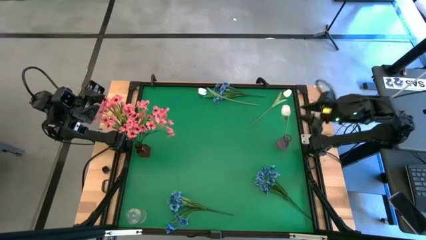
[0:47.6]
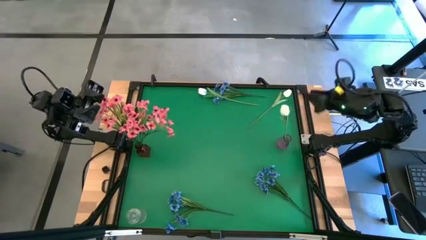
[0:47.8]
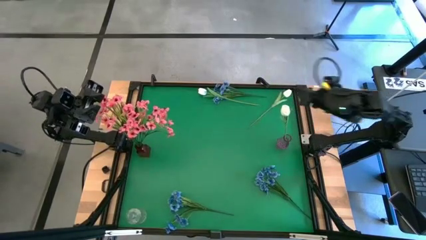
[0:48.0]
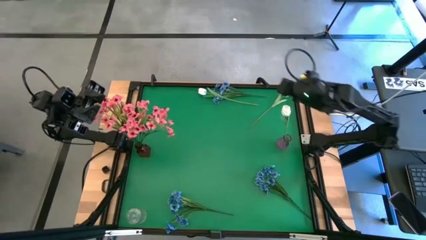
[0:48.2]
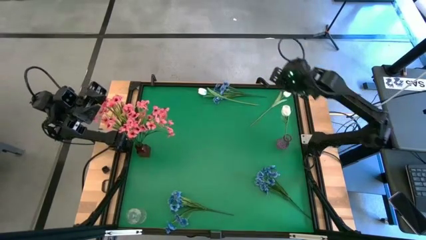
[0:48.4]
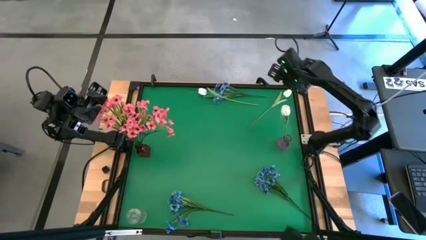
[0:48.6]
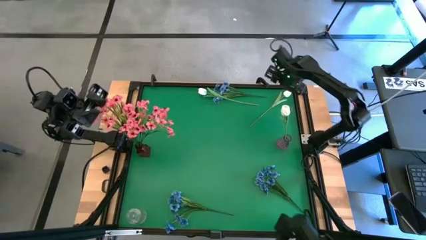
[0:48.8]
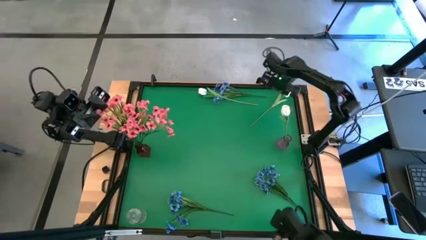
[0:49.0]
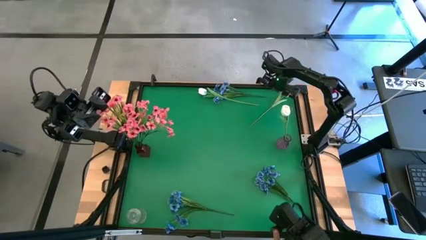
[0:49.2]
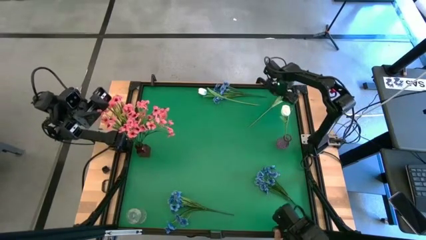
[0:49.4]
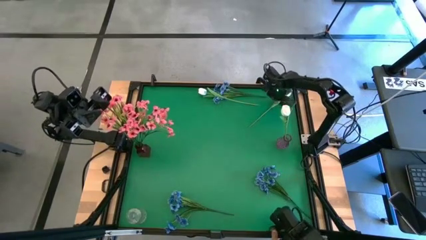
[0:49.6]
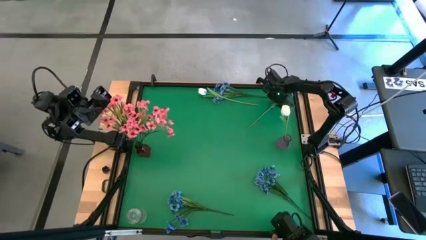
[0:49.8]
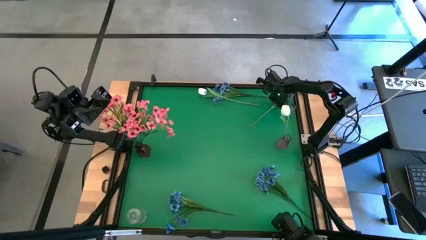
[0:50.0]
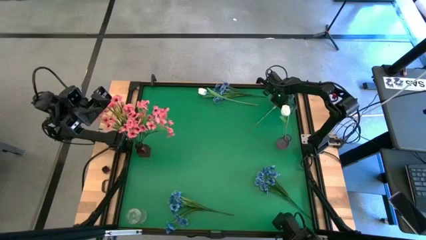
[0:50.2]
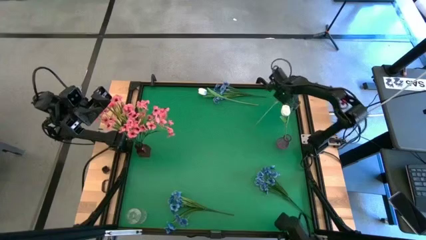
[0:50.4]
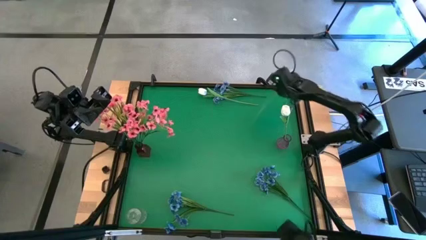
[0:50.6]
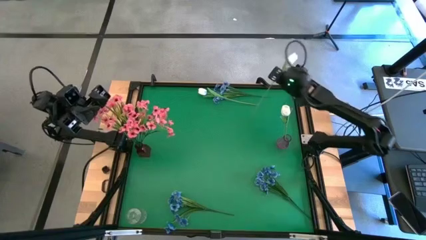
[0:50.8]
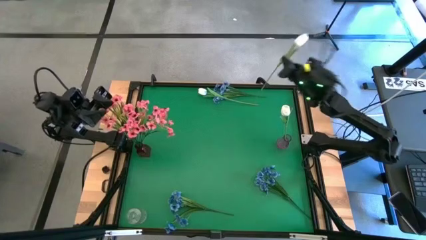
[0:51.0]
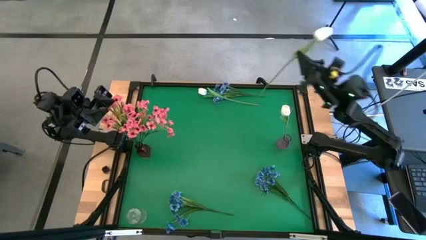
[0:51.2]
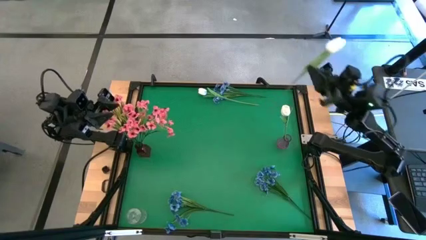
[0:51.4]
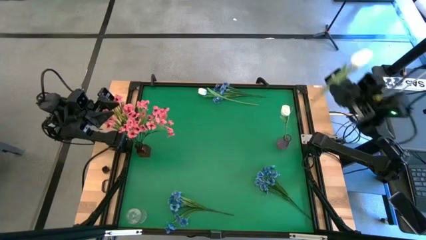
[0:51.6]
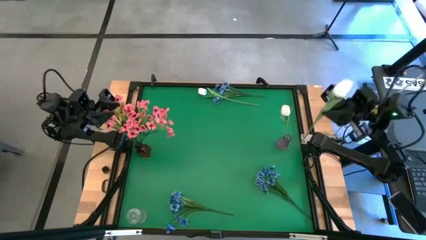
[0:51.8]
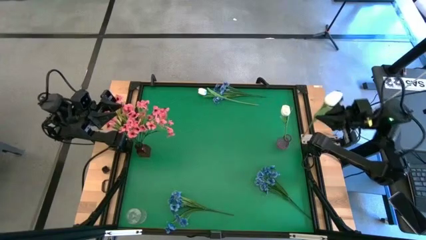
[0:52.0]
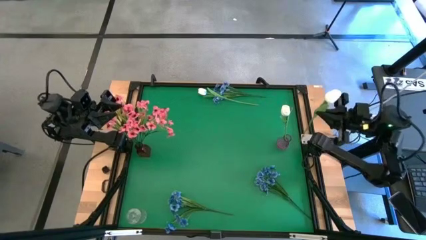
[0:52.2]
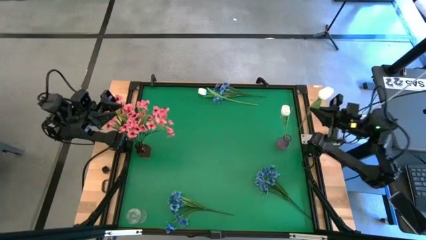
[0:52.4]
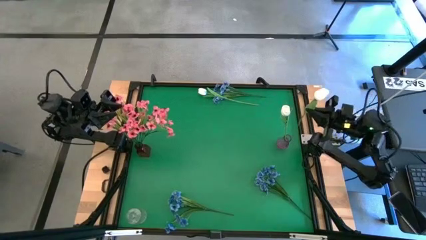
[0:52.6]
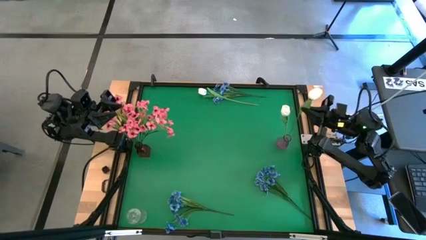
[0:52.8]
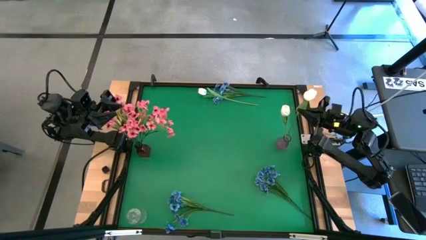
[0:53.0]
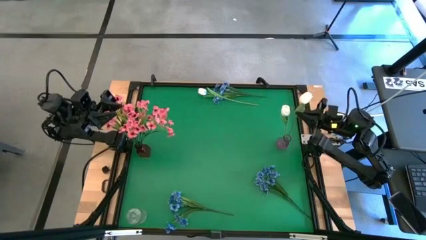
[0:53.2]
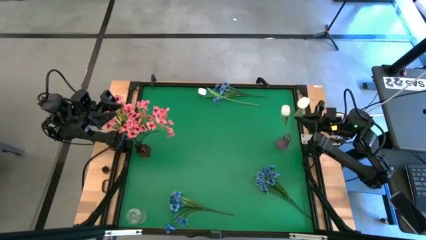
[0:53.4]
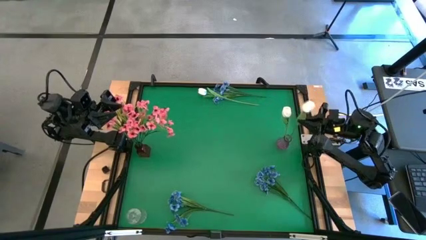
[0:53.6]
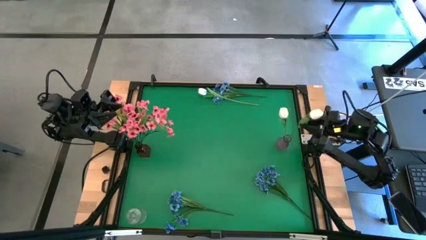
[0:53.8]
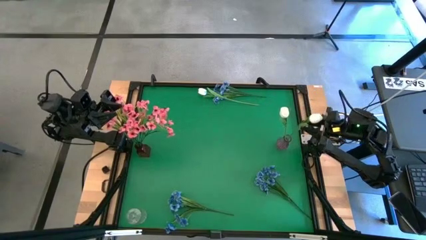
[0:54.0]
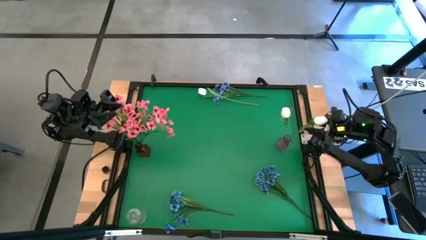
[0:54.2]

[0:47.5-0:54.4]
Task: Sort flowers into vase by color
Put the right white flower into the violet vase

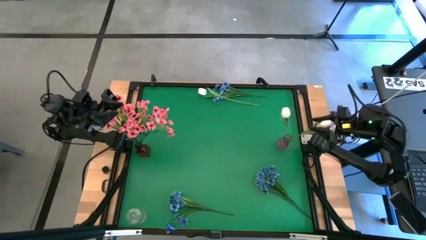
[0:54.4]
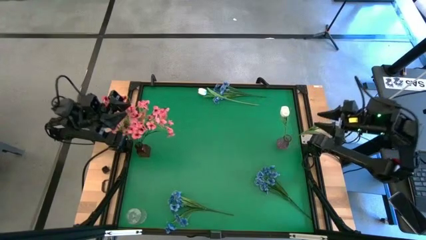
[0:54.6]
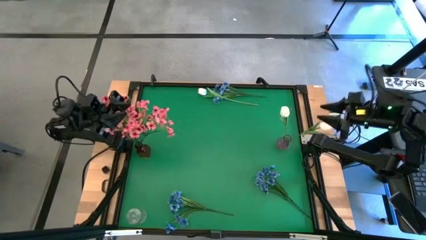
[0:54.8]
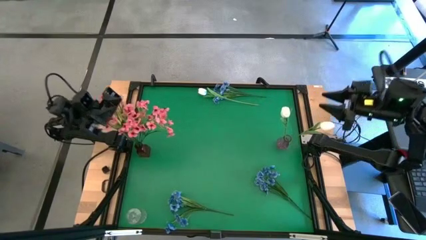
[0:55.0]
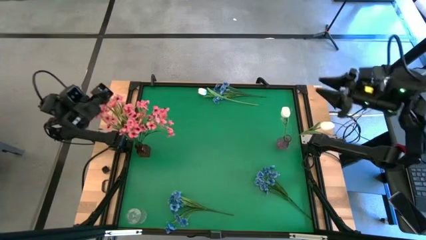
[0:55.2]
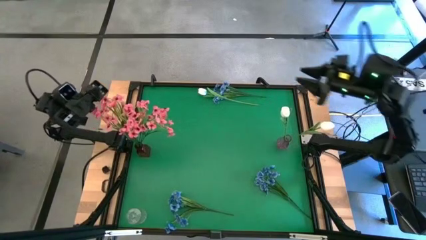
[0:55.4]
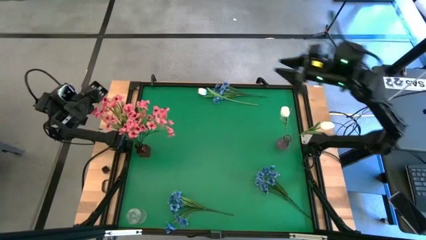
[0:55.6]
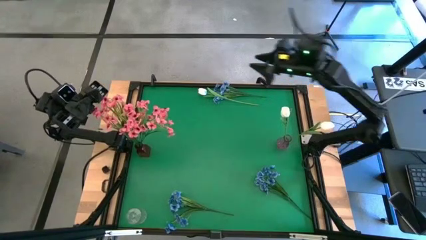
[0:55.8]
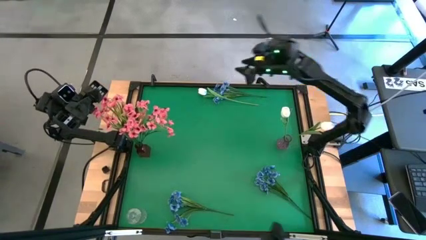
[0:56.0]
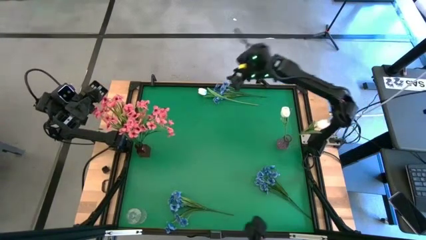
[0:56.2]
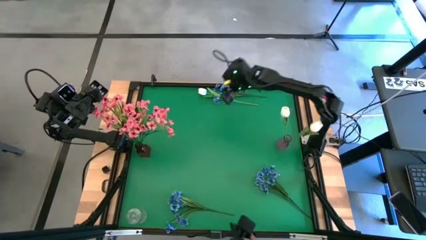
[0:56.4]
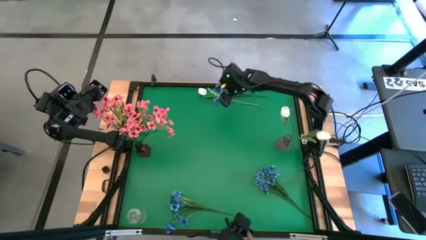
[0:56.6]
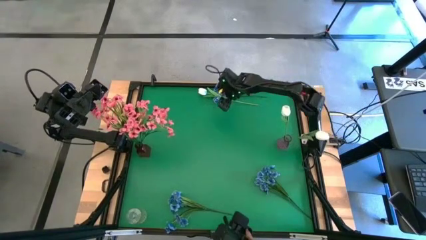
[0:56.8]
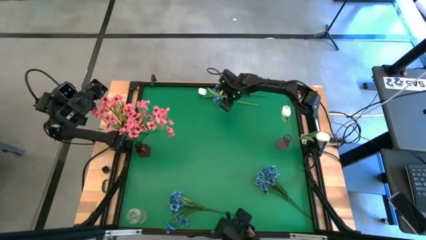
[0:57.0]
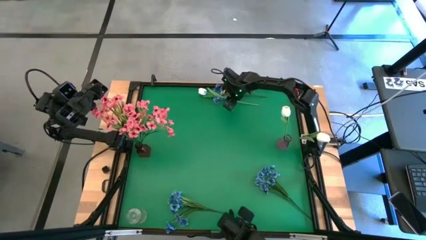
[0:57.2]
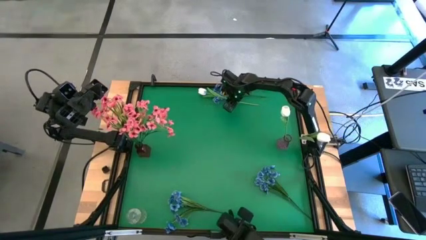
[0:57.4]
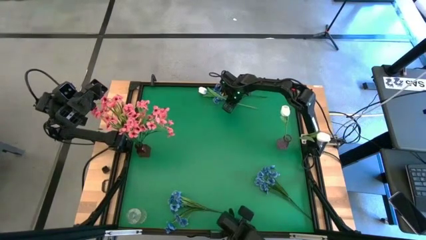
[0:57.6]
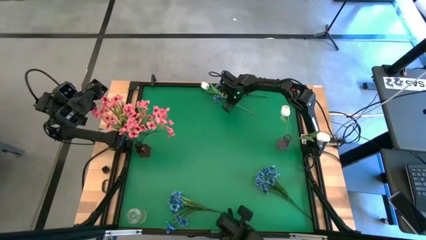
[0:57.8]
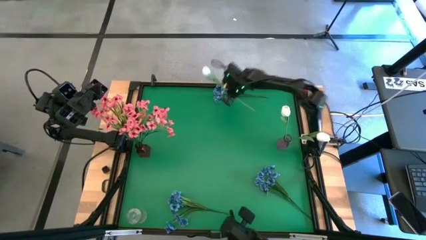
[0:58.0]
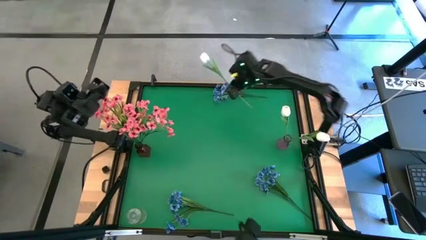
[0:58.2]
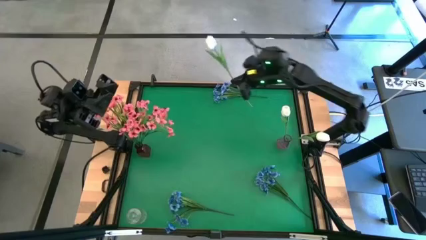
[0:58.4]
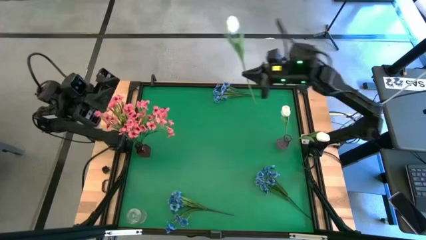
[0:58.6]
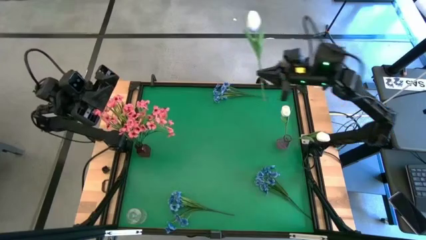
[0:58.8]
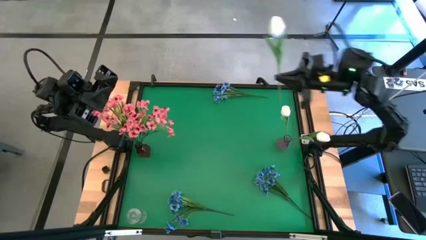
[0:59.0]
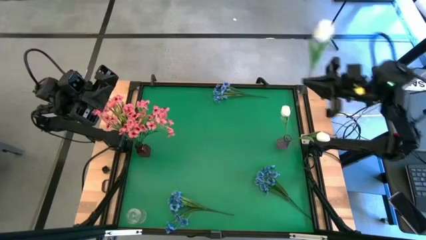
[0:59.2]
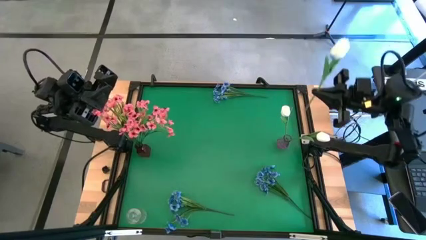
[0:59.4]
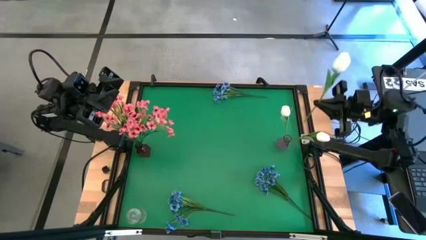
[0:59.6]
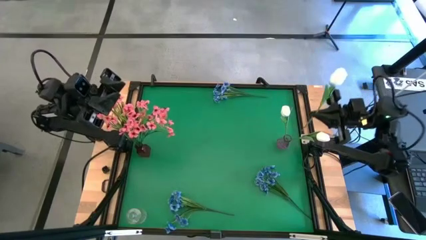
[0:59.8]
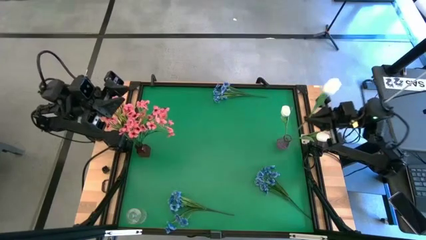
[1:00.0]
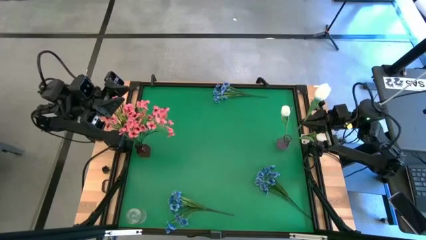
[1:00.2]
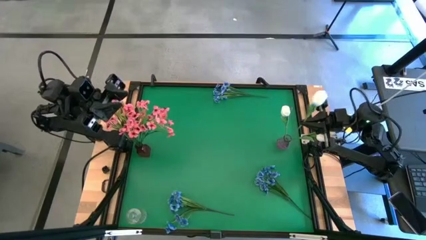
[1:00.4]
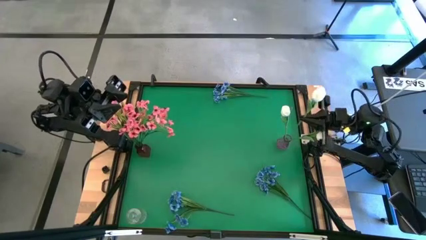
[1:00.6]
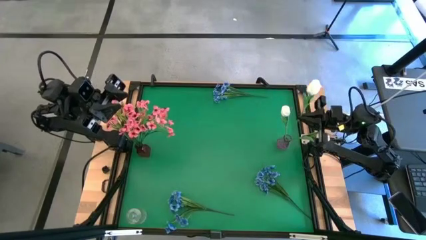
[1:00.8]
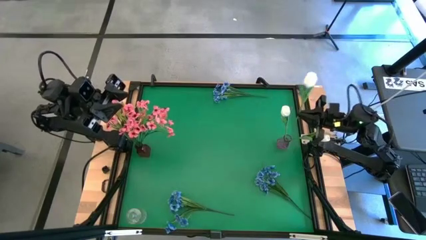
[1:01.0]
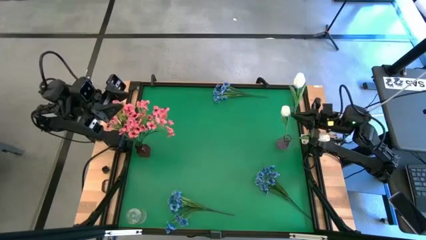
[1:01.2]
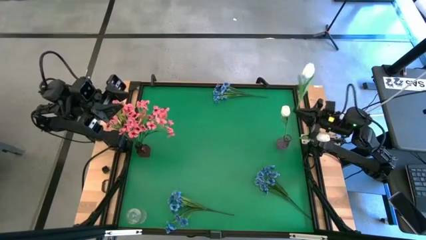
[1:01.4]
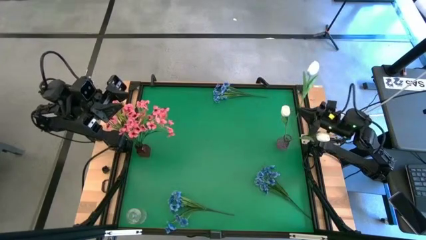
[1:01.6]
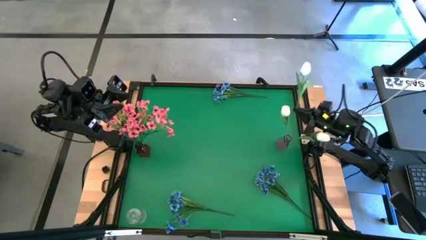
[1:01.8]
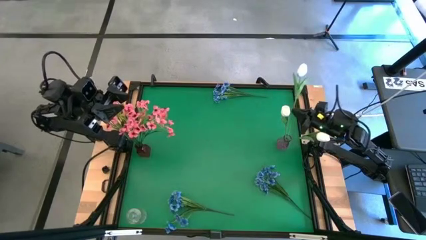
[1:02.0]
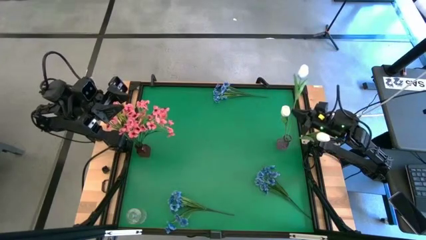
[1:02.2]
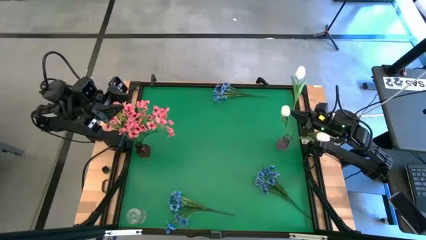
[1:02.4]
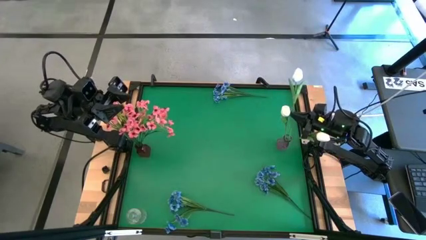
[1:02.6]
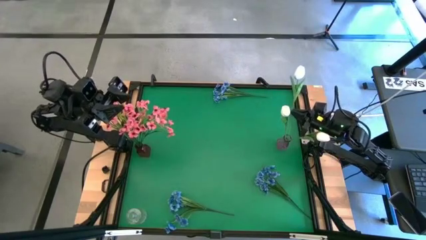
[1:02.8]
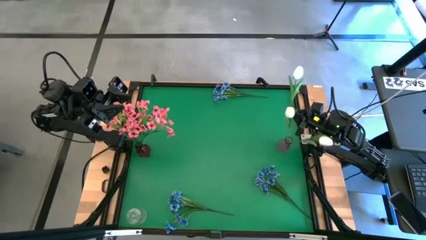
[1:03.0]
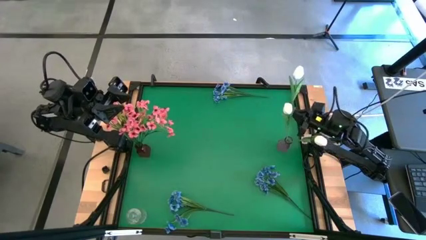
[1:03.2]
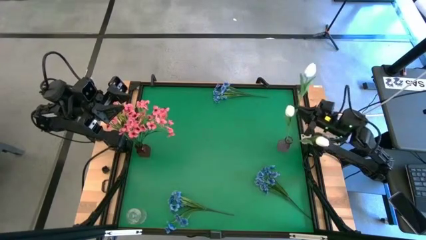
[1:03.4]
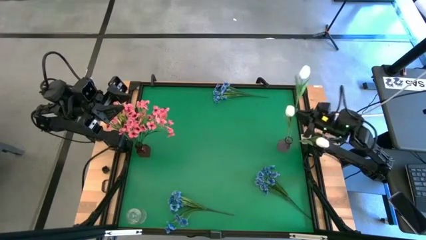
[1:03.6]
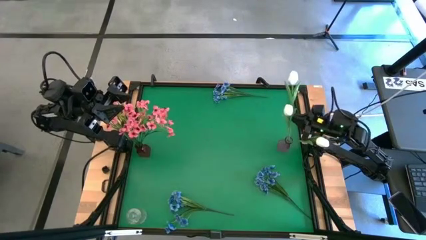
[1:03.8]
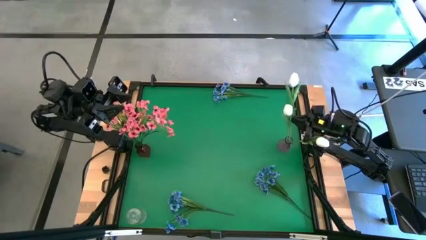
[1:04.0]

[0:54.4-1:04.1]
Put the white flower into the violet vase
